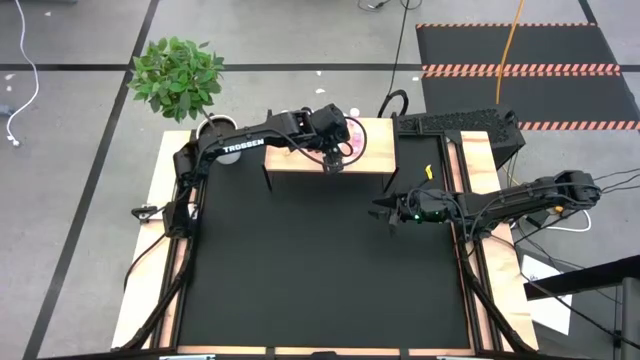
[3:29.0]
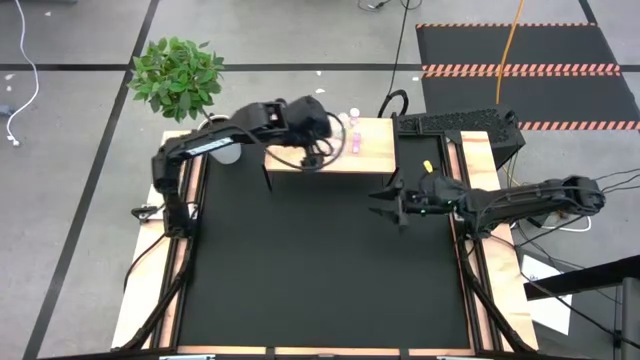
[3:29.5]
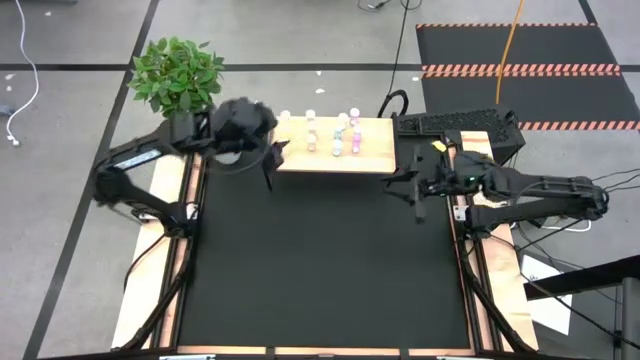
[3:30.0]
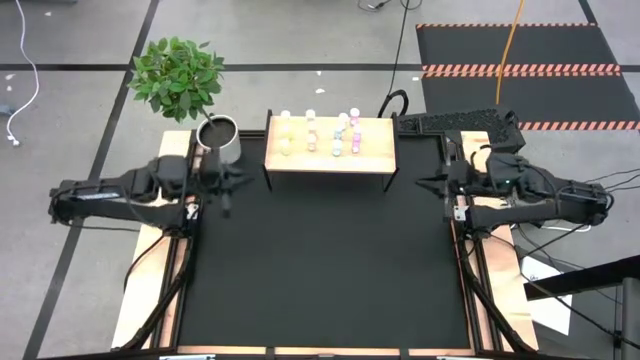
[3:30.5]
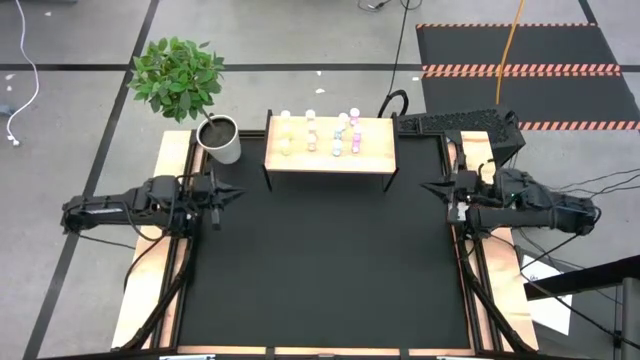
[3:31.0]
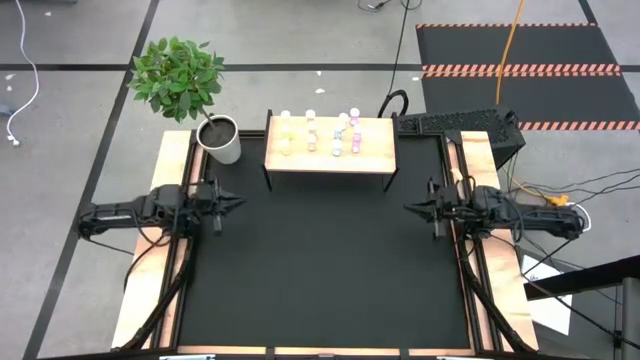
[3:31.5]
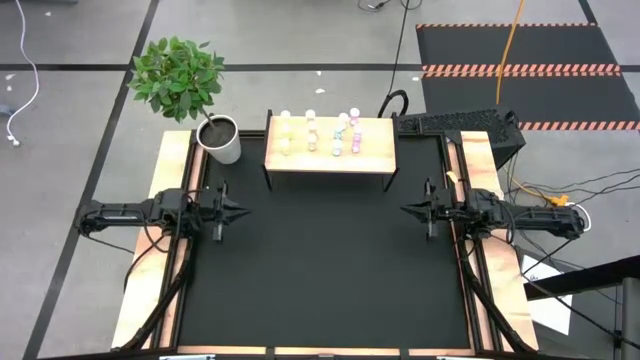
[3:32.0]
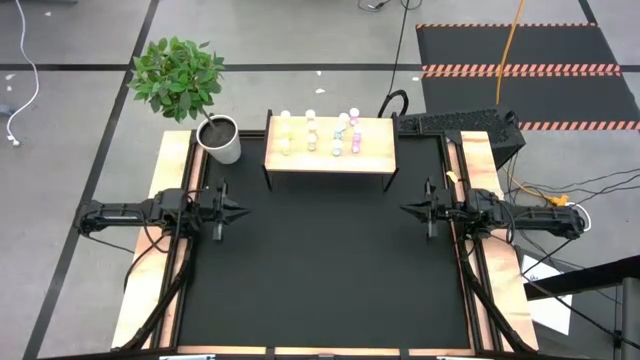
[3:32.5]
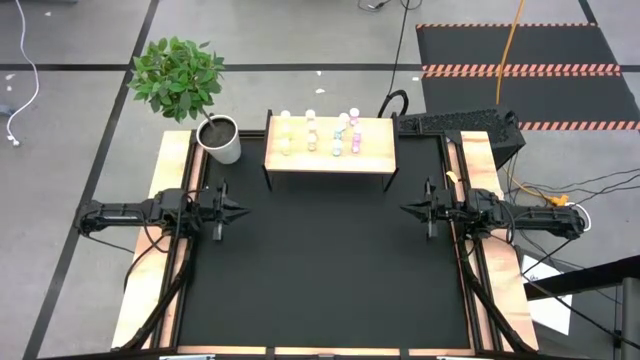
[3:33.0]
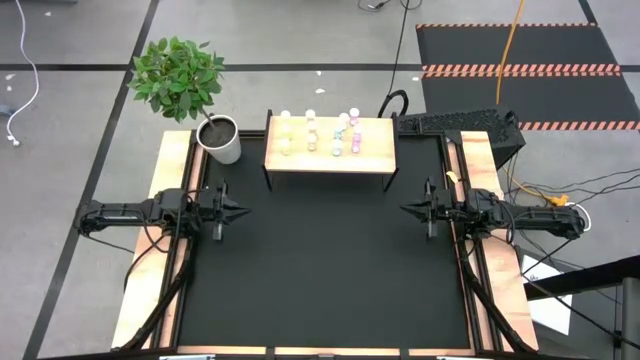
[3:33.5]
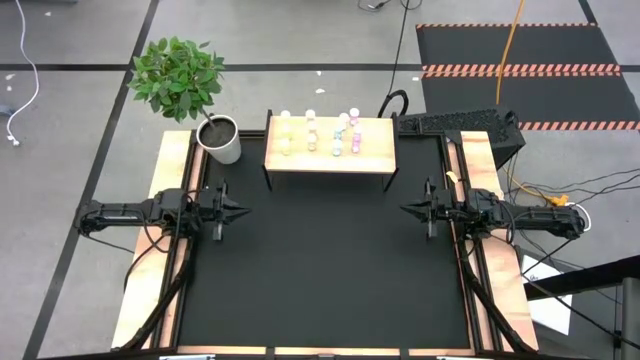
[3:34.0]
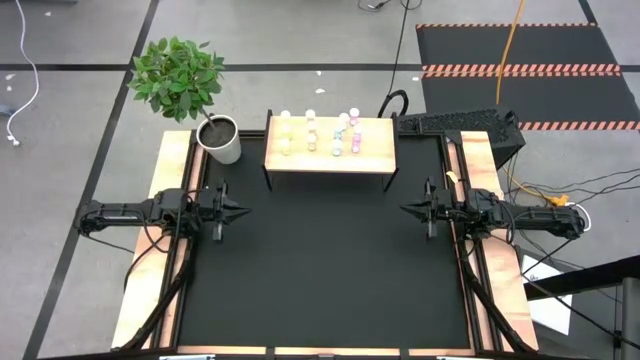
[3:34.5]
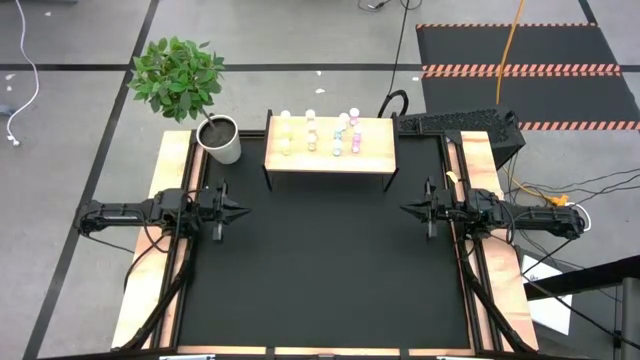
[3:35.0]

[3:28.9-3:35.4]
Task: Pick and place medicine bottles onto shelf by color
Return to Home Position

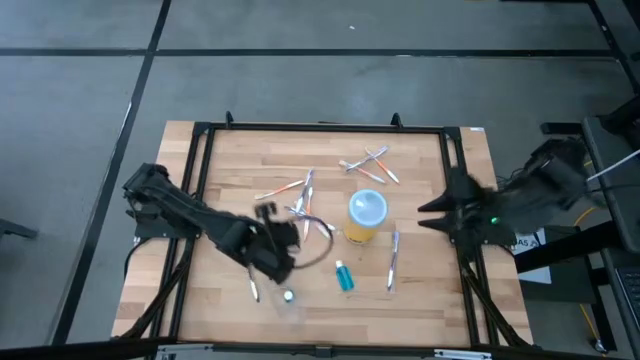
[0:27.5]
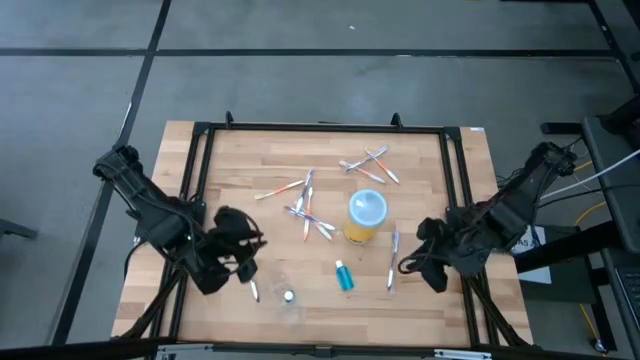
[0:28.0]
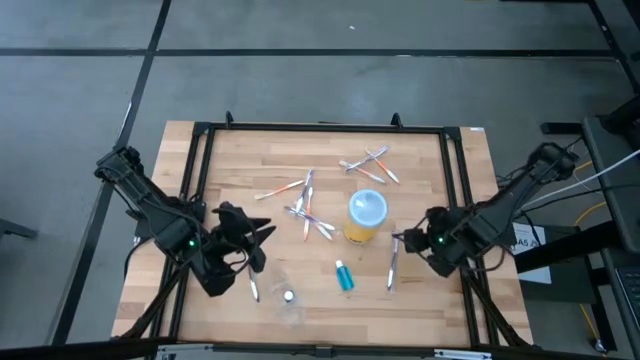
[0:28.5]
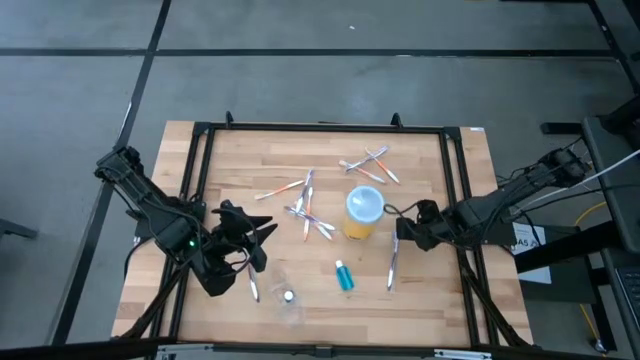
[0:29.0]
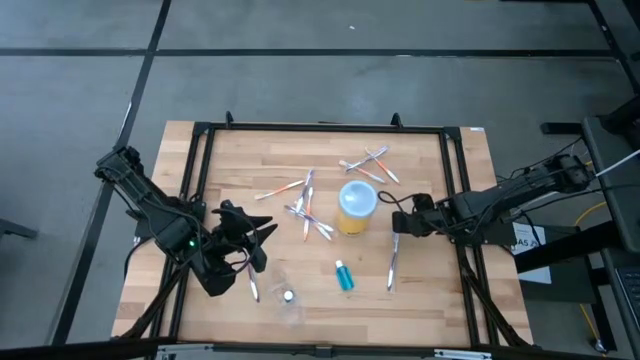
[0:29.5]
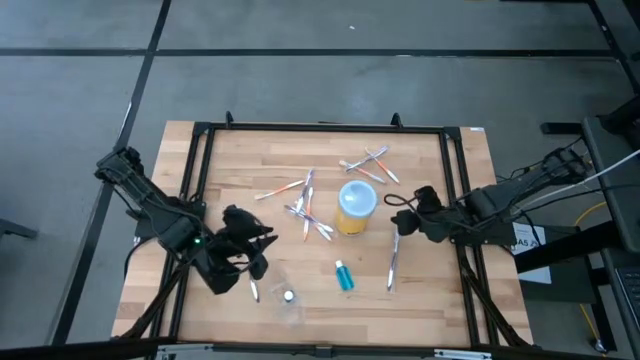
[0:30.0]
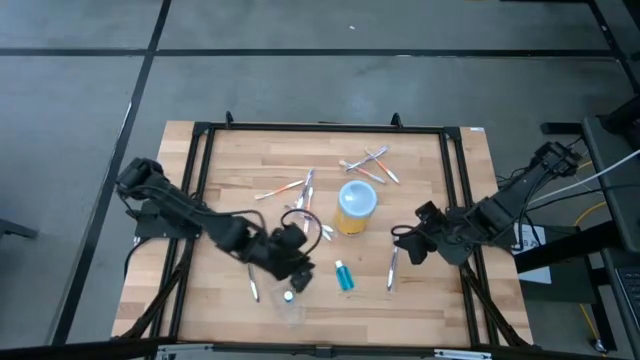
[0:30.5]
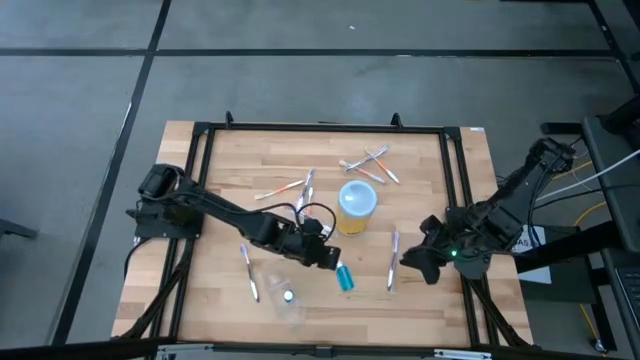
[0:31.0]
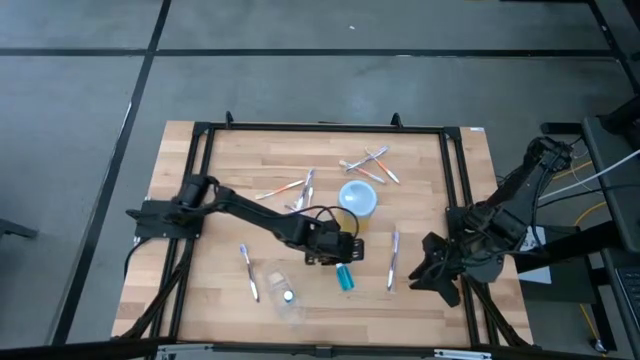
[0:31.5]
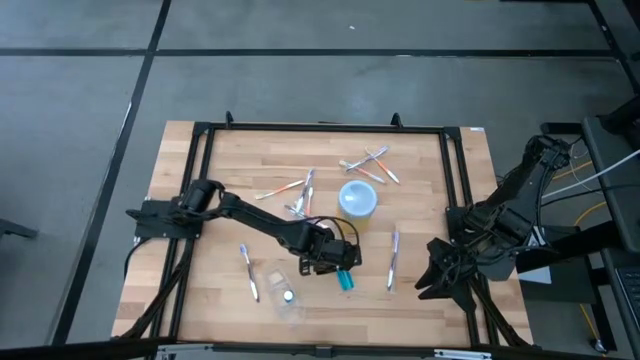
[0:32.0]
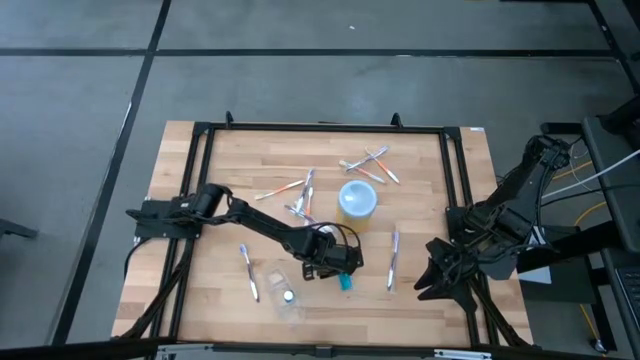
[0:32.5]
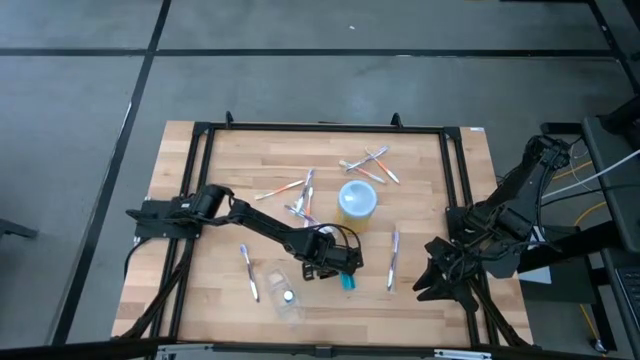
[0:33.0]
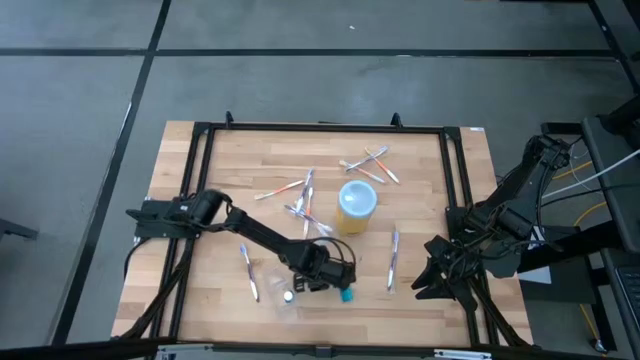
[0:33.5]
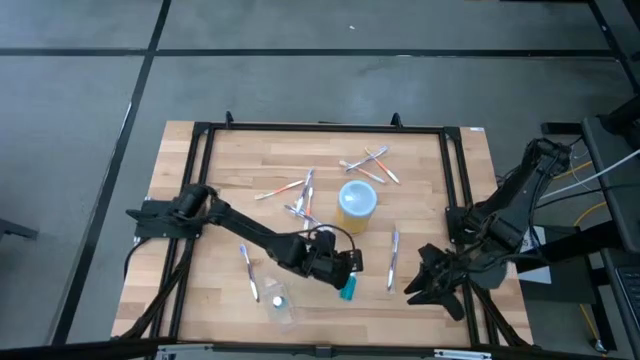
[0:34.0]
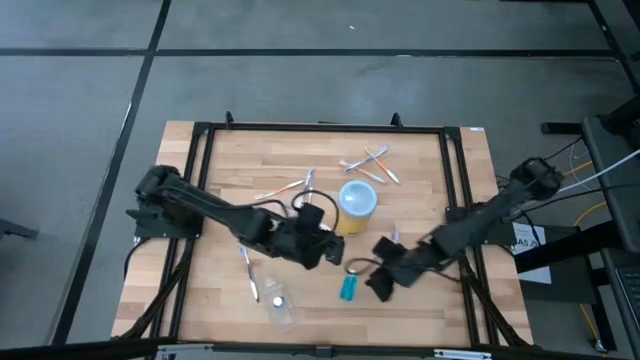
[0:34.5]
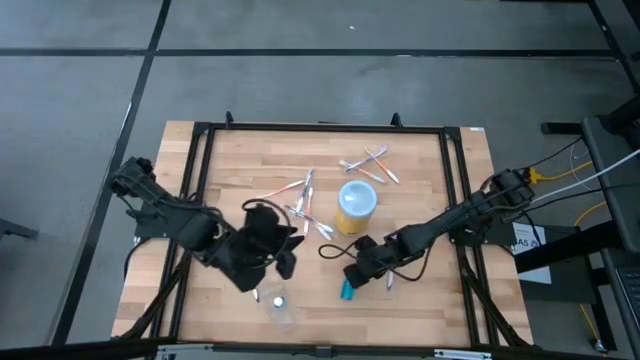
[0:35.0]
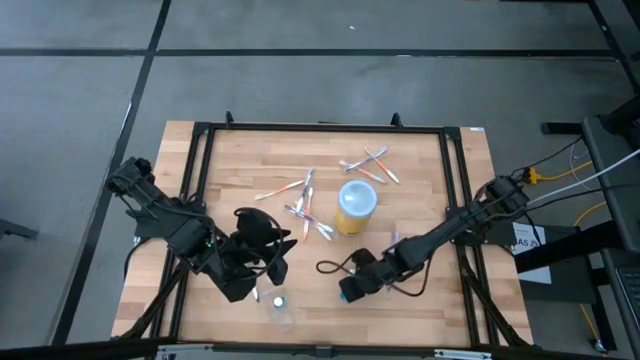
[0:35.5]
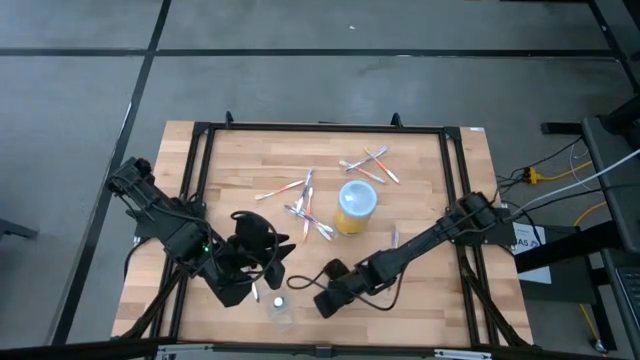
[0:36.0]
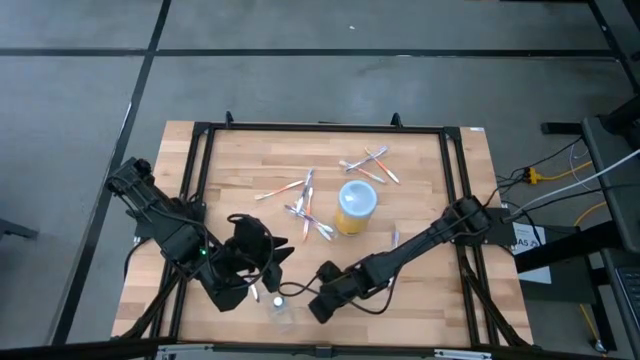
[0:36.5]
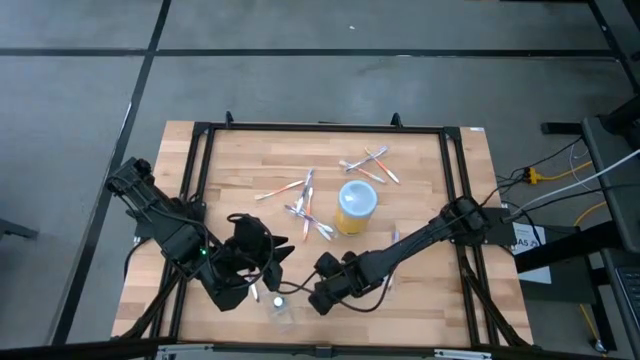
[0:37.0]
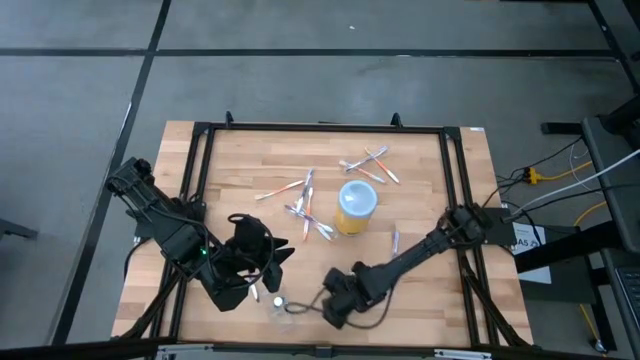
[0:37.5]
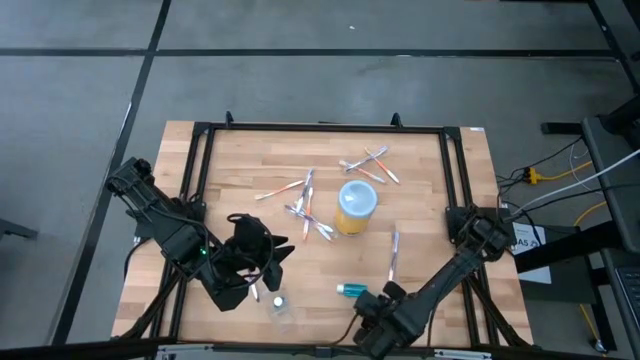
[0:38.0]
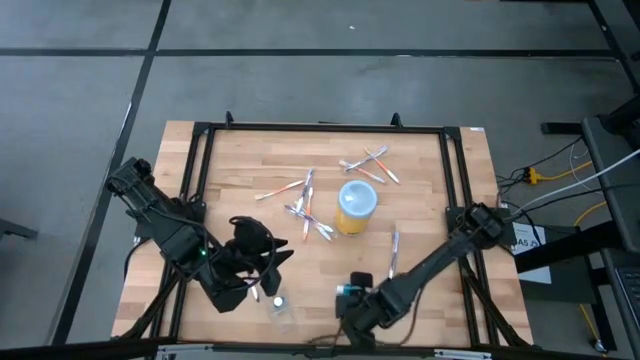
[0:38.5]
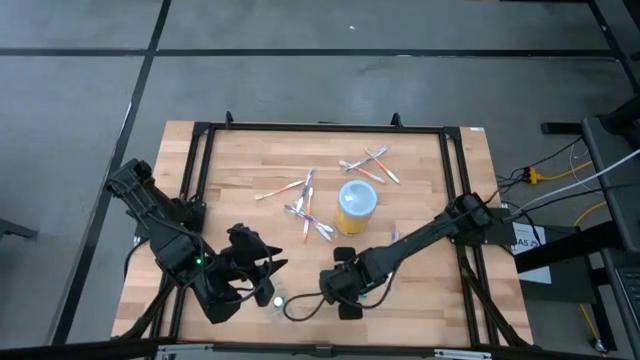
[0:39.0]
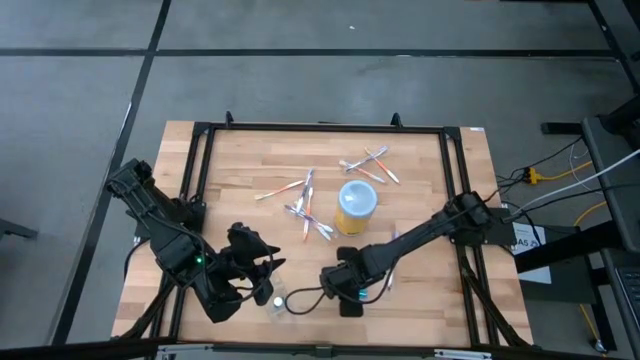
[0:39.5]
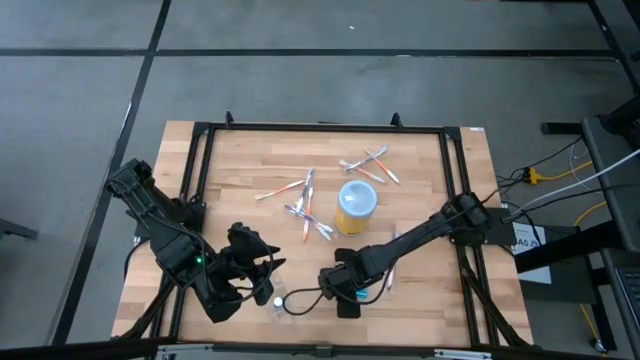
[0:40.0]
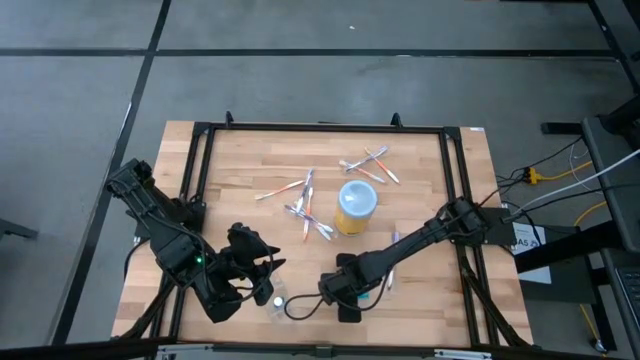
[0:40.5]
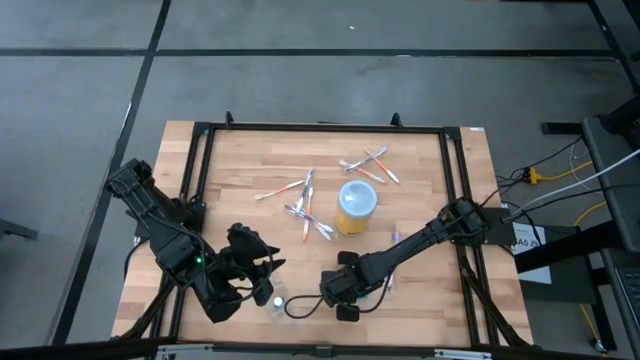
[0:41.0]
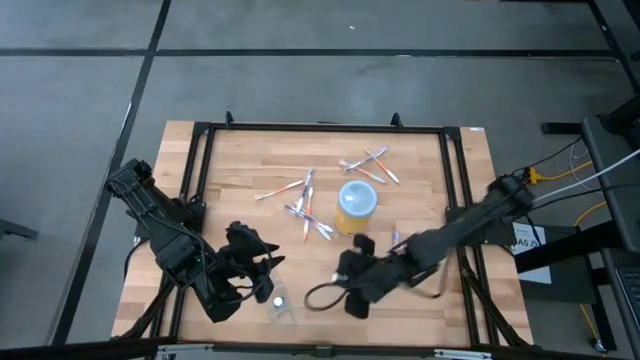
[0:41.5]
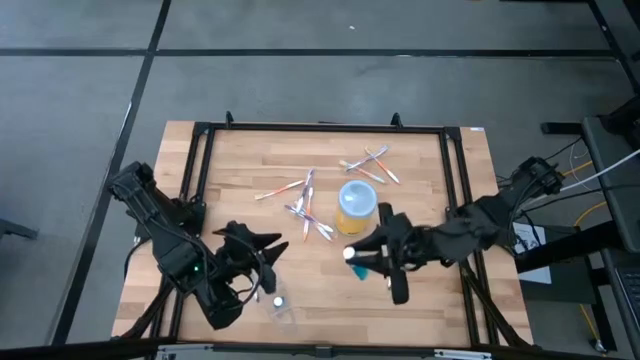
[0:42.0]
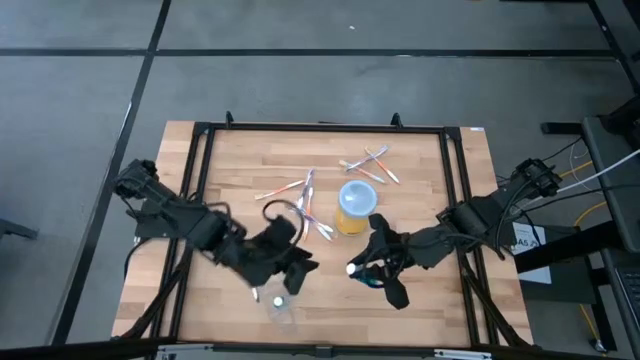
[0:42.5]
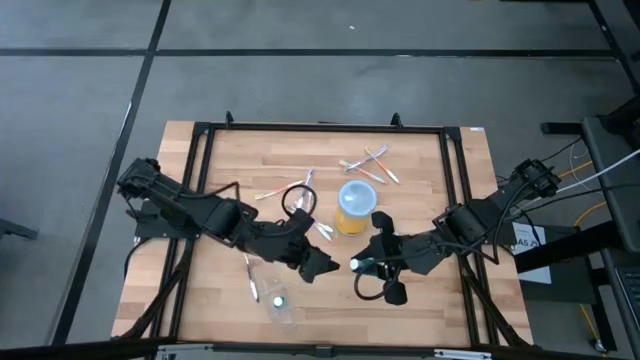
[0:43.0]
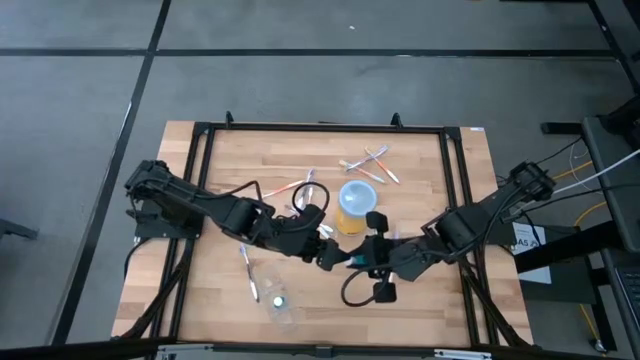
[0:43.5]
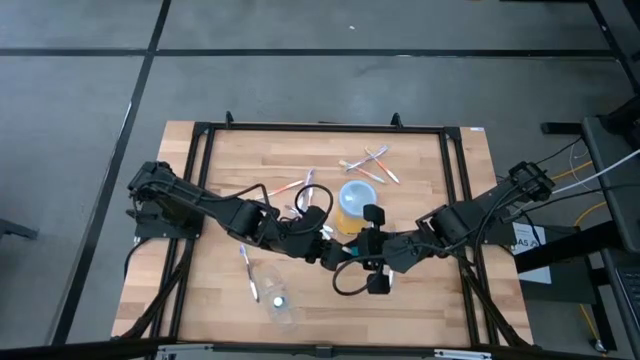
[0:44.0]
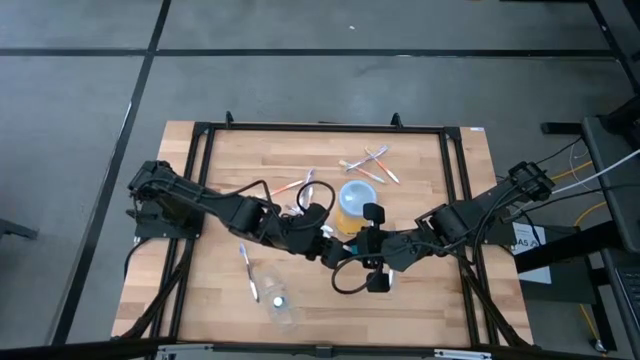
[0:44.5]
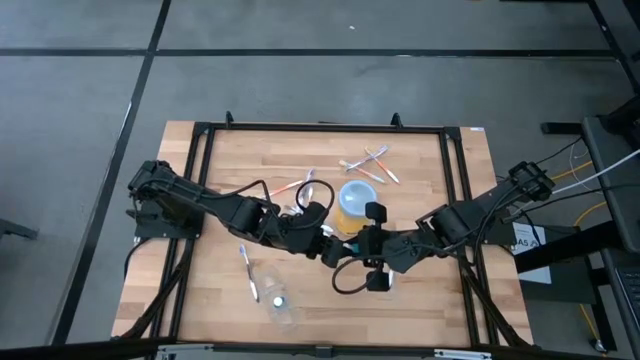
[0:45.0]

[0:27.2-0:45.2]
Task: Pick & Place toothbrushing station
Put the mouthwash bottle into the middle part of the transparent organizer
